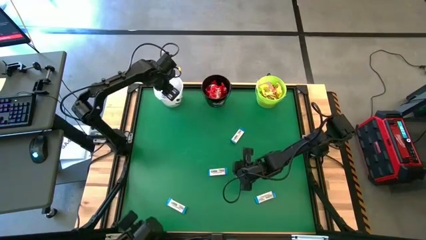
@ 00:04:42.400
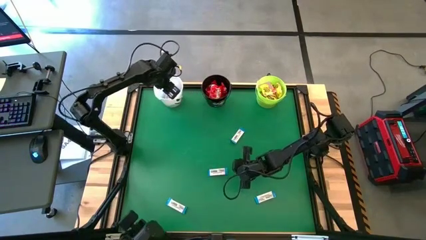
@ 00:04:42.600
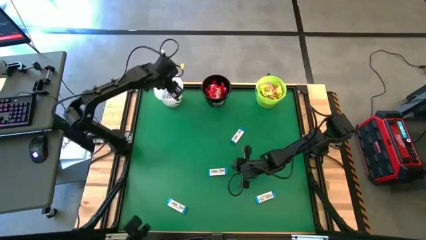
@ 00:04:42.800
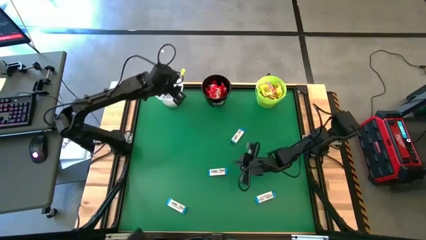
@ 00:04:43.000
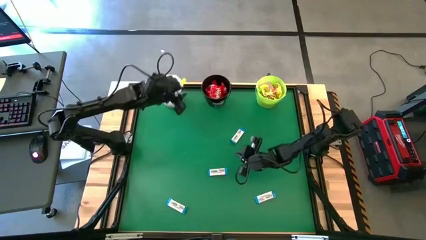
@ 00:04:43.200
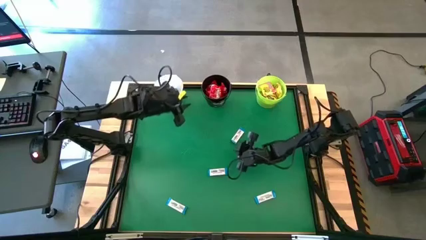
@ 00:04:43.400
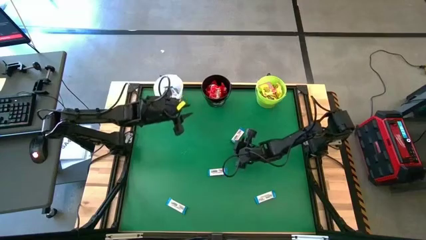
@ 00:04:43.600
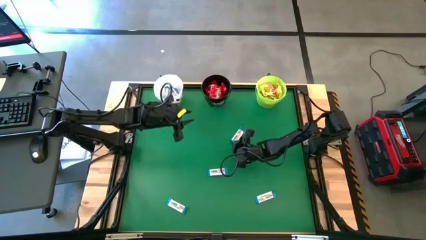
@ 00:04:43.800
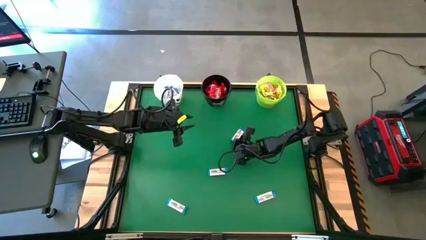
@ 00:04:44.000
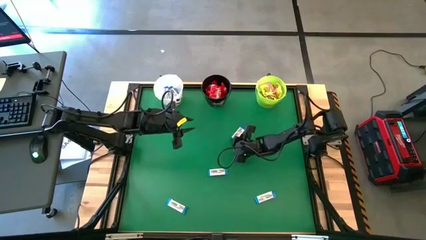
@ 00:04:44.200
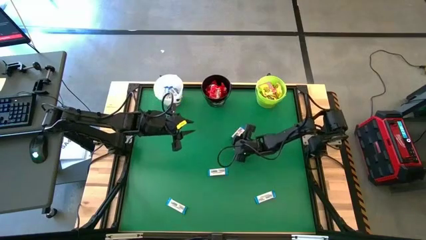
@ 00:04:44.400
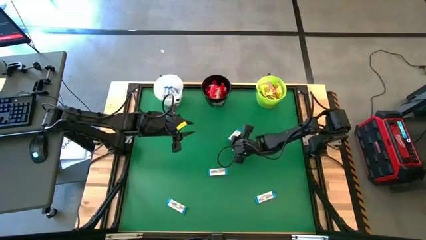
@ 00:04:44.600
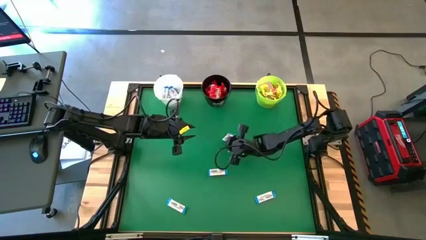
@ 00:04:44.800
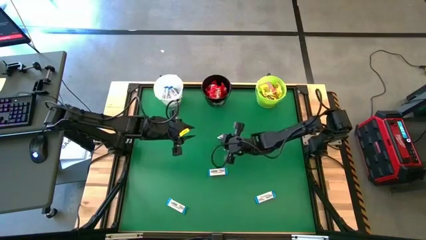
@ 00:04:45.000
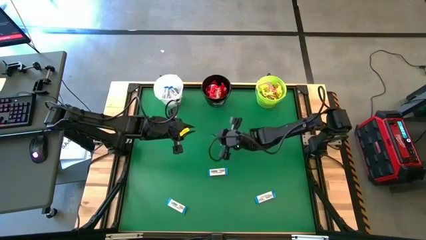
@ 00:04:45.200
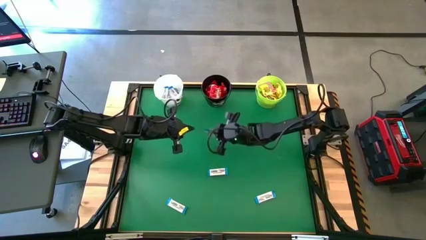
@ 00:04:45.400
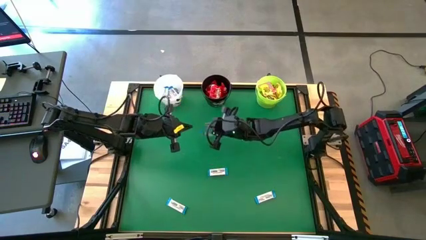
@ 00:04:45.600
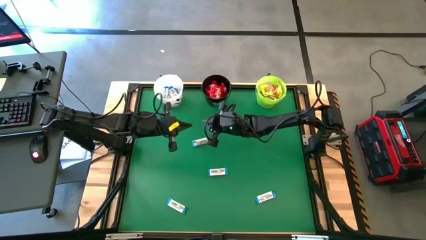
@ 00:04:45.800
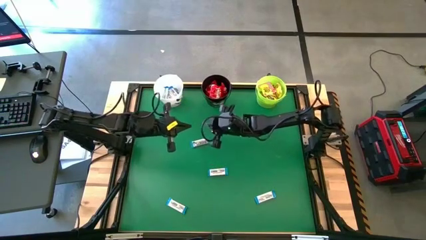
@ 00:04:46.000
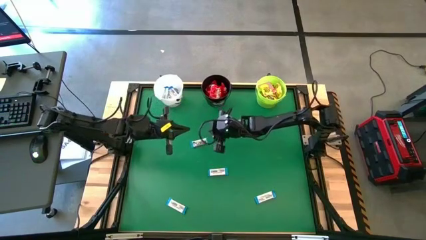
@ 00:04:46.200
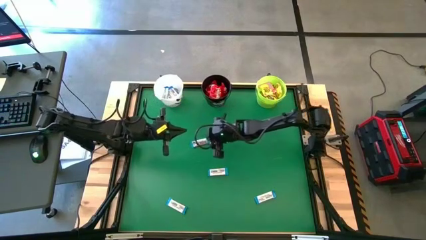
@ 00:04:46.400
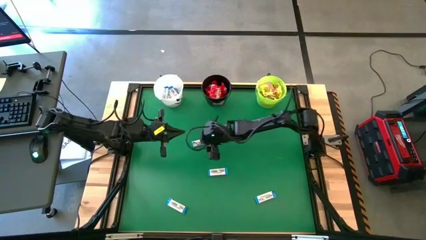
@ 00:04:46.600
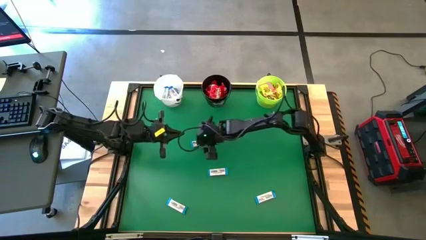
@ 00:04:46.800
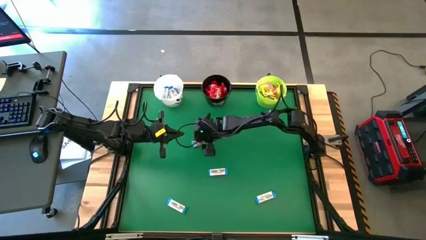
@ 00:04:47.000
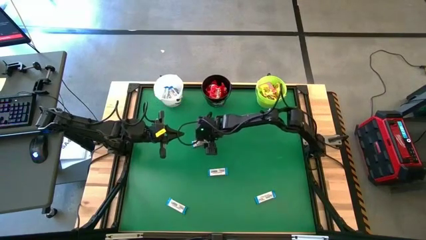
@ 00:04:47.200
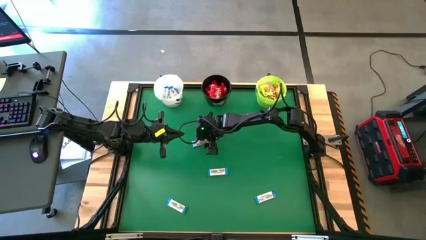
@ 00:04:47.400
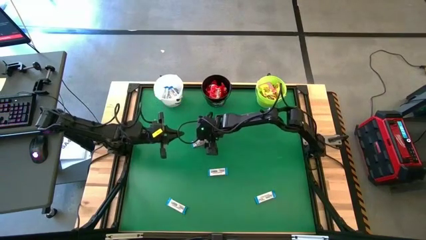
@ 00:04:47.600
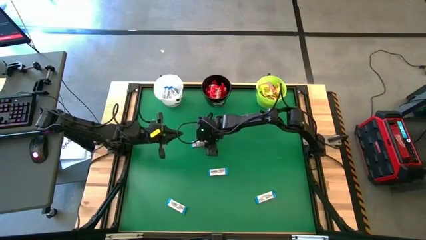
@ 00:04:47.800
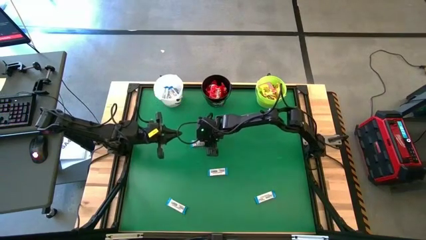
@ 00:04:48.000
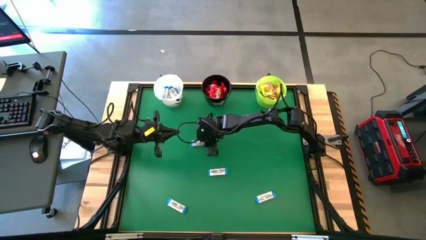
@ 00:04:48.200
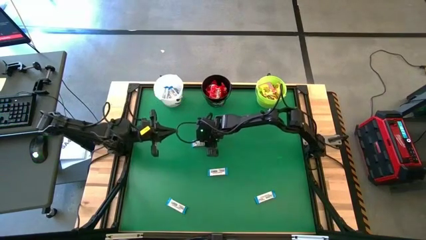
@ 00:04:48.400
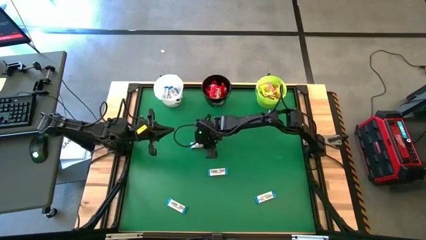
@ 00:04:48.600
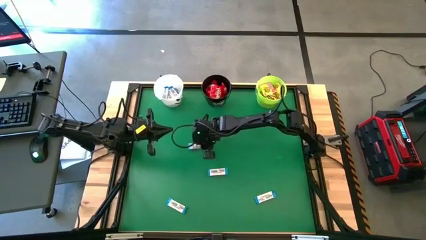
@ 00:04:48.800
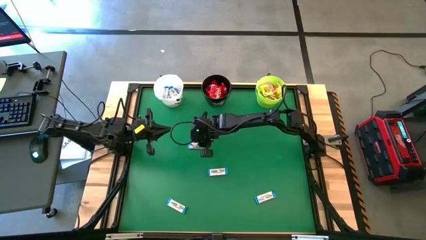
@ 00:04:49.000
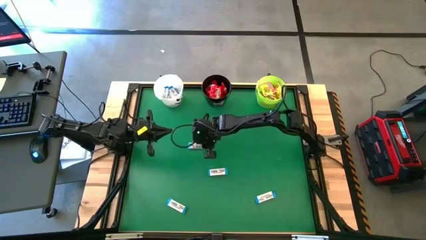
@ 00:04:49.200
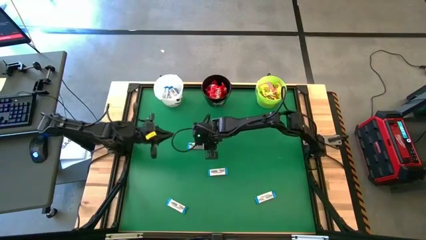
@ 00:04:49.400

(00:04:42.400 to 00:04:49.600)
Task: Sort candy by brand, put in halloween buckets
Put the white chocolate bar into the white bucket

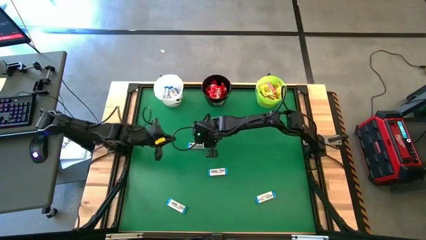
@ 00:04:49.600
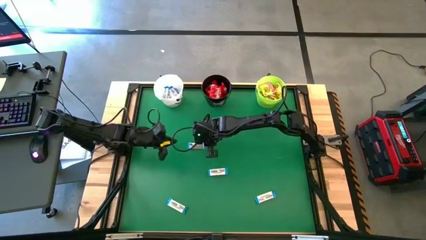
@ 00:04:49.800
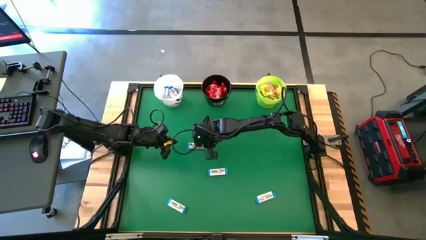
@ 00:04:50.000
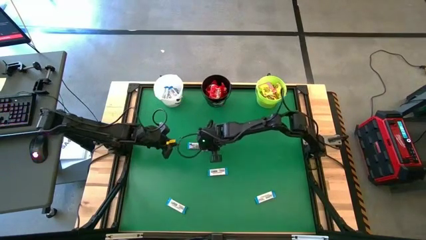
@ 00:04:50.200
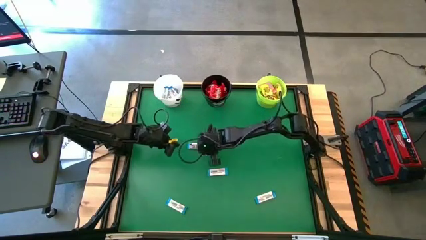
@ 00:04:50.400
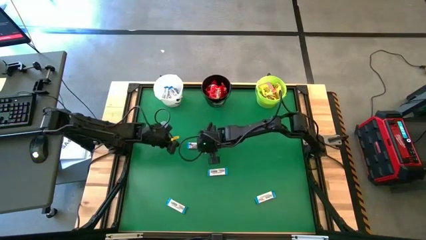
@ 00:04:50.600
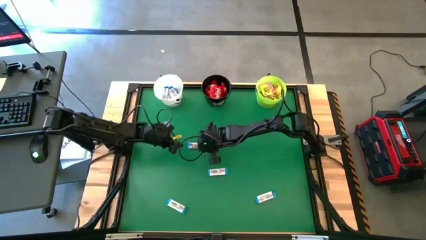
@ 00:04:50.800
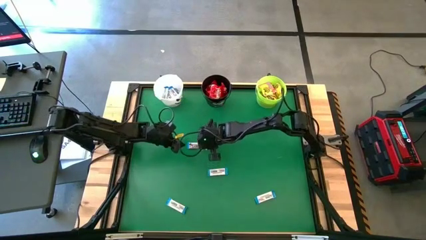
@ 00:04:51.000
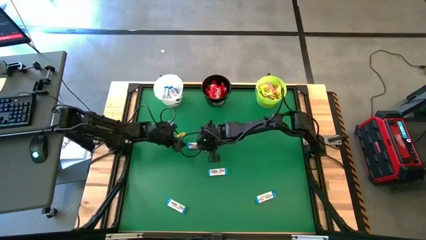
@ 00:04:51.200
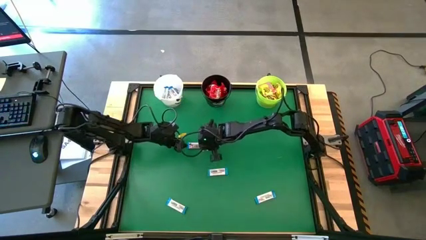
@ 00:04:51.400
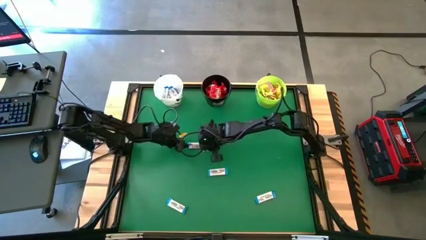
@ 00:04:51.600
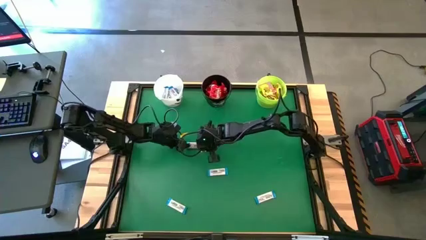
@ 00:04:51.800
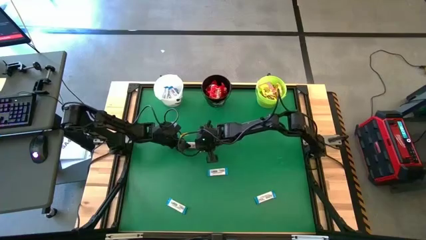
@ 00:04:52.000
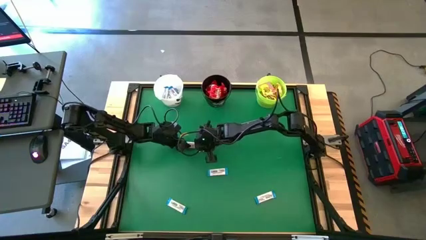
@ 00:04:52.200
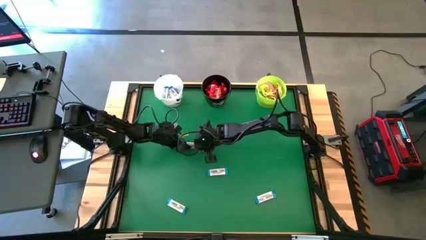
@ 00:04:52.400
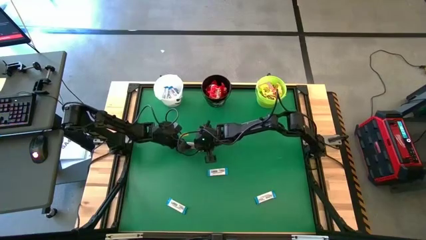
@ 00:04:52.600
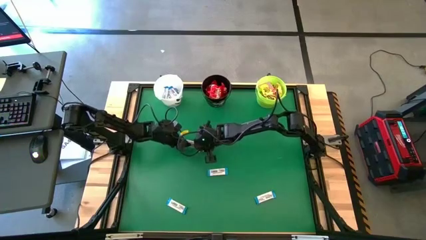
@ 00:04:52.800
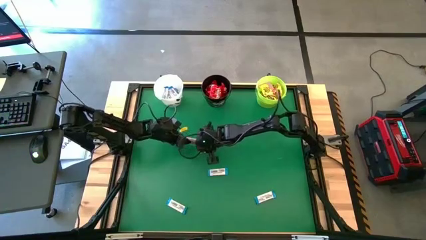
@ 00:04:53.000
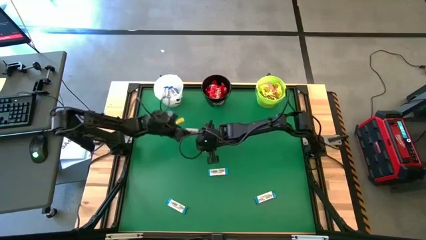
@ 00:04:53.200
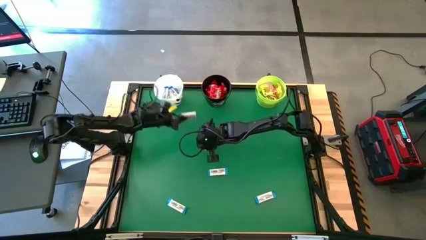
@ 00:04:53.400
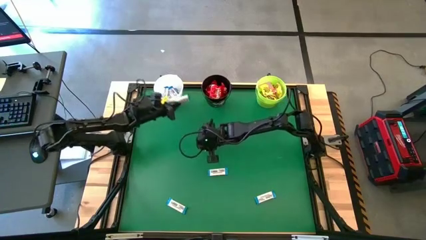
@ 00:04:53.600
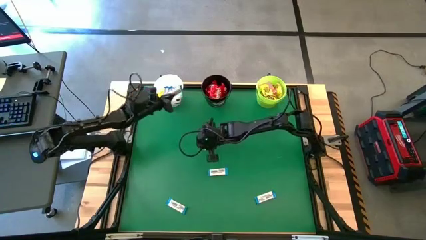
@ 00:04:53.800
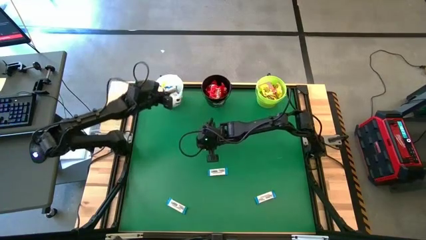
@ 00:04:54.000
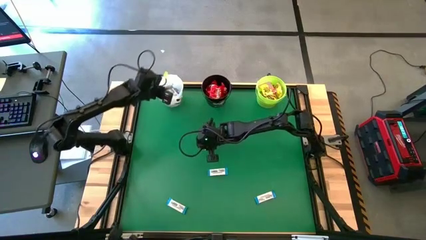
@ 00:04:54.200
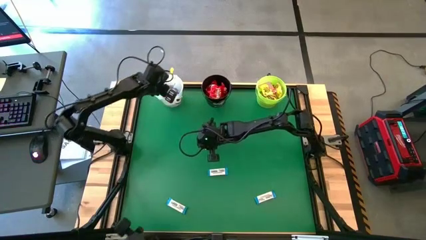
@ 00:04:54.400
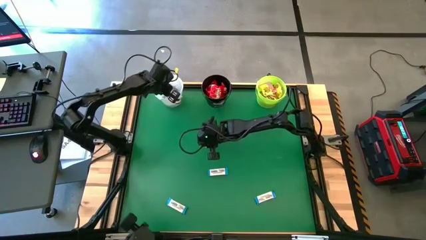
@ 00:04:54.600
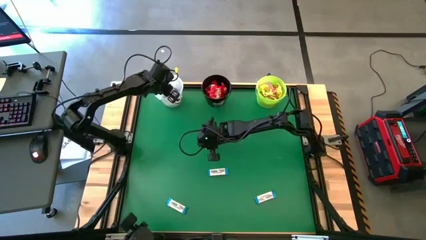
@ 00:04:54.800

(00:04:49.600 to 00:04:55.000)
Put the white chocolate bar into the white bucket

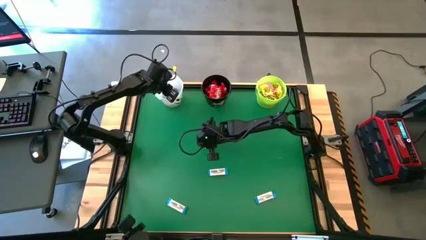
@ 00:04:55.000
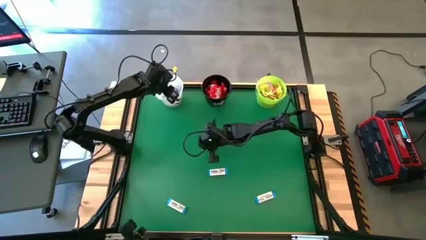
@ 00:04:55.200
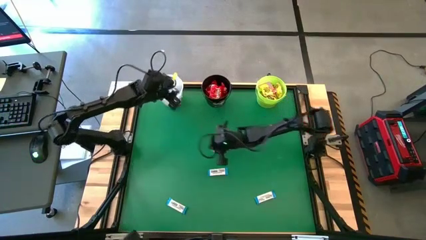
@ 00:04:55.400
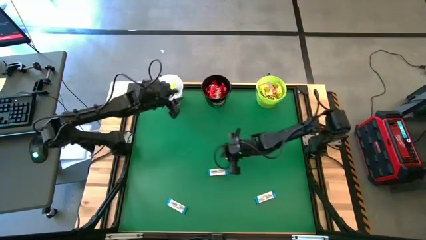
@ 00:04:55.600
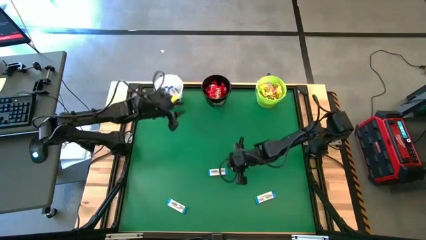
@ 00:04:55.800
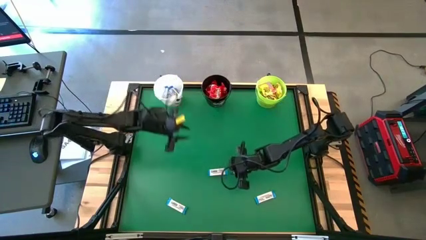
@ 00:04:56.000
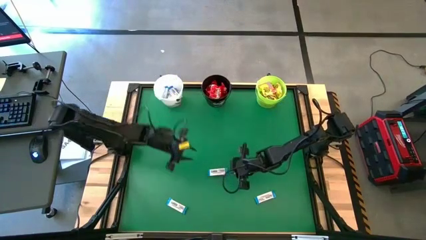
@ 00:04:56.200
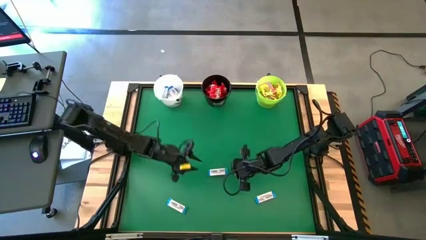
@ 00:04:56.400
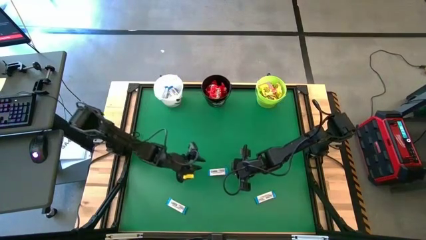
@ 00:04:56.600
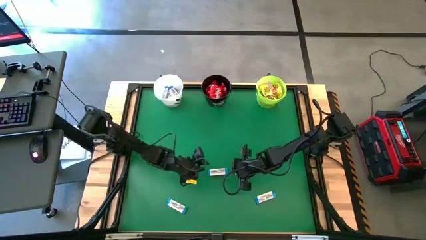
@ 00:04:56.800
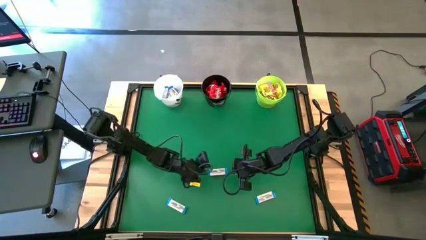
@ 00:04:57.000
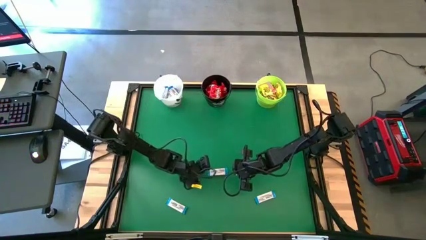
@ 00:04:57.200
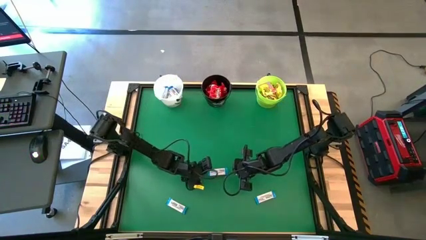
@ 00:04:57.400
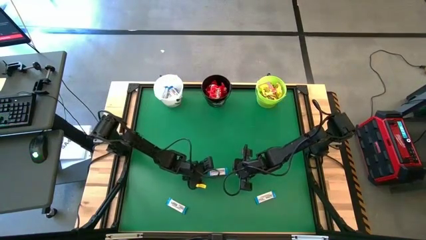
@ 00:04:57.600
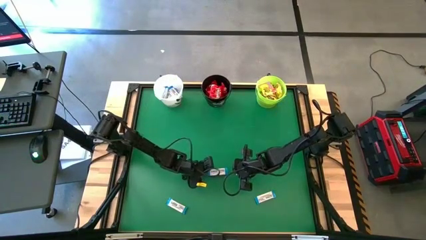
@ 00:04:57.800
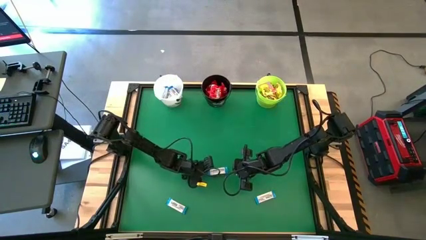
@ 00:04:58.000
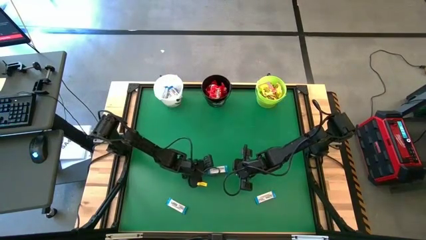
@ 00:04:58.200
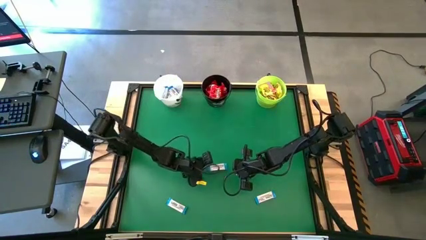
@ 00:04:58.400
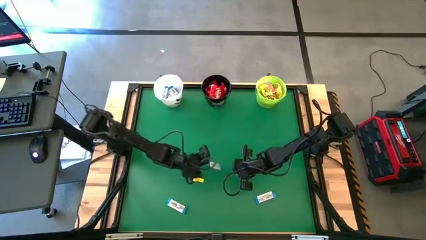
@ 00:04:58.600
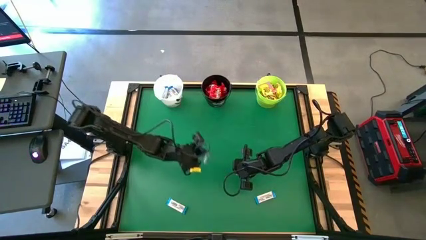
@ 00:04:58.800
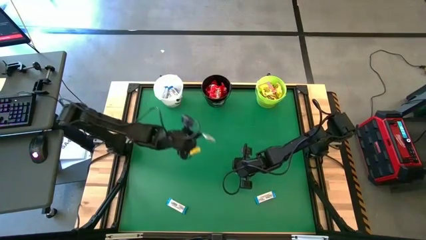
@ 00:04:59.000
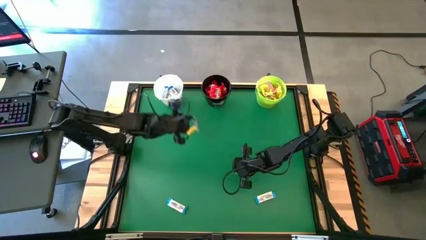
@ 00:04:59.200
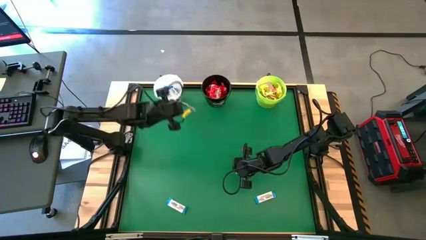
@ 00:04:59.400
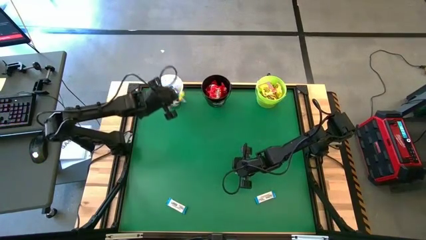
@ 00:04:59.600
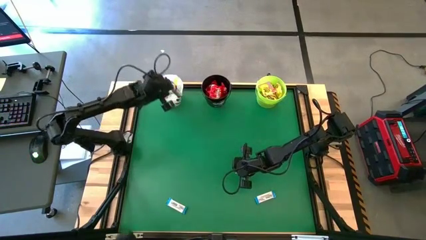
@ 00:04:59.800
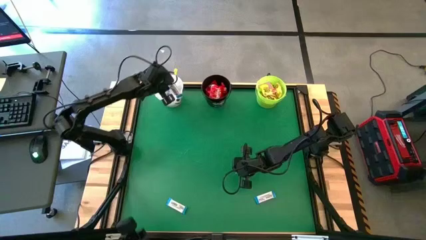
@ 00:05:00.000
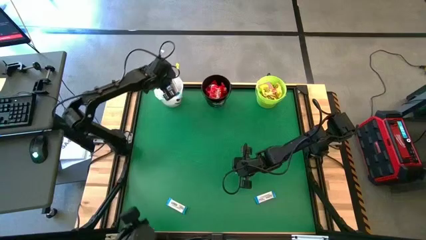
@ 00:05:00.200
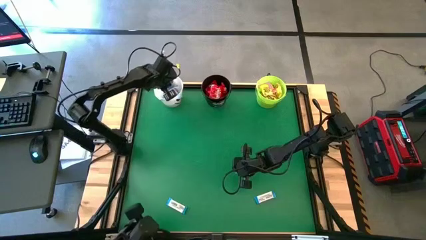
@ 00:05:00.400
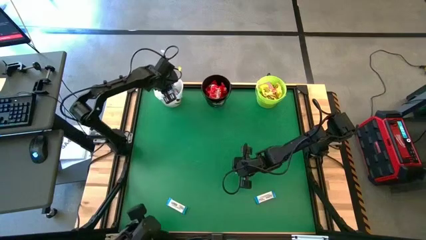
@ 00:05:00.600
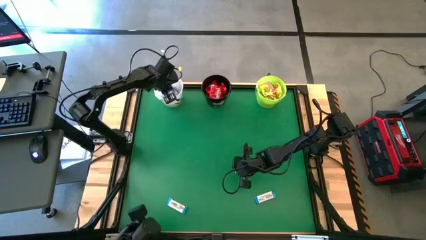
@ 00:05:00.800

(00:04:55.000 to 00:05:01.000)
Put the white chocolate bar into the white bucket
